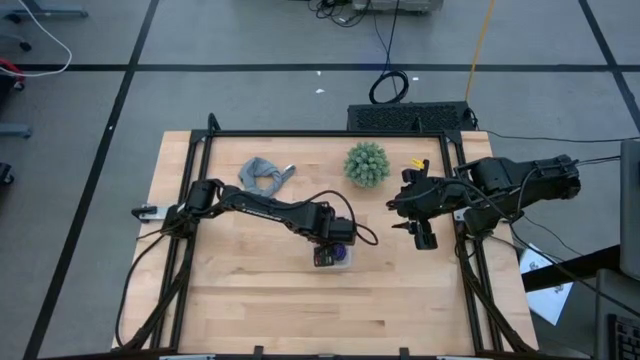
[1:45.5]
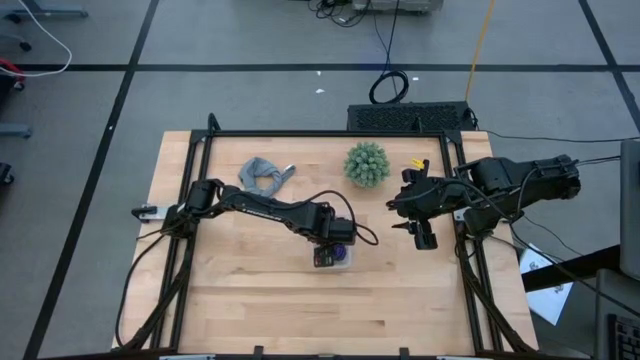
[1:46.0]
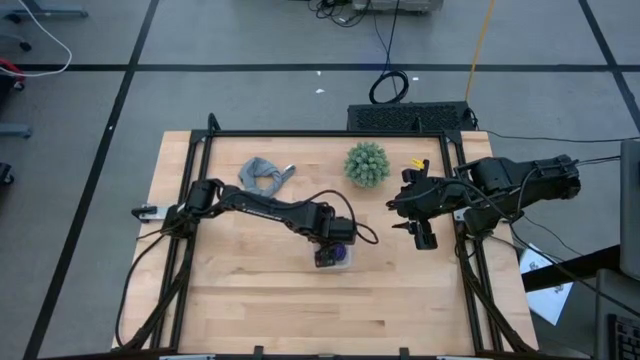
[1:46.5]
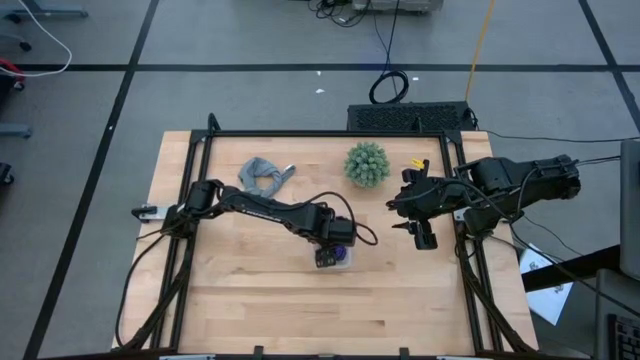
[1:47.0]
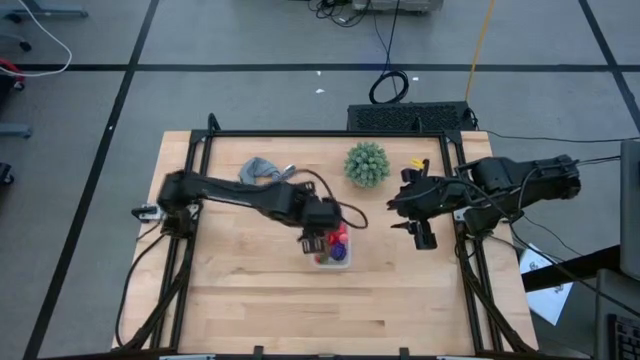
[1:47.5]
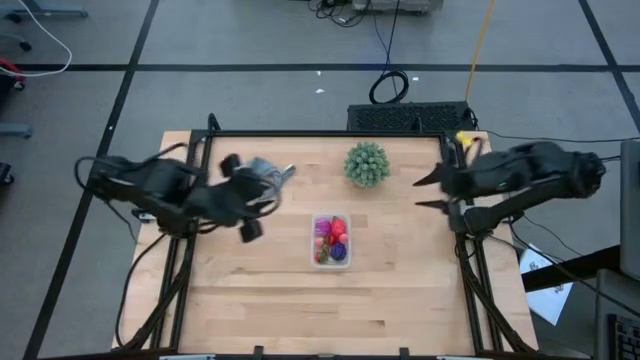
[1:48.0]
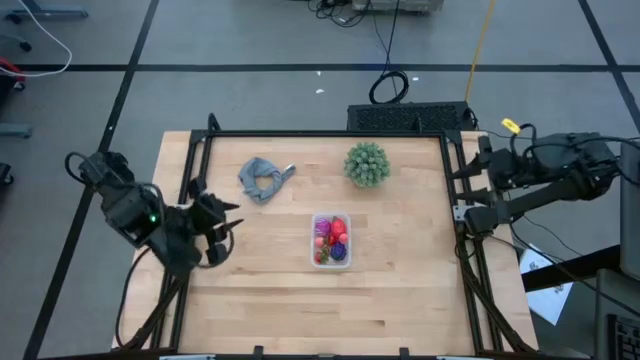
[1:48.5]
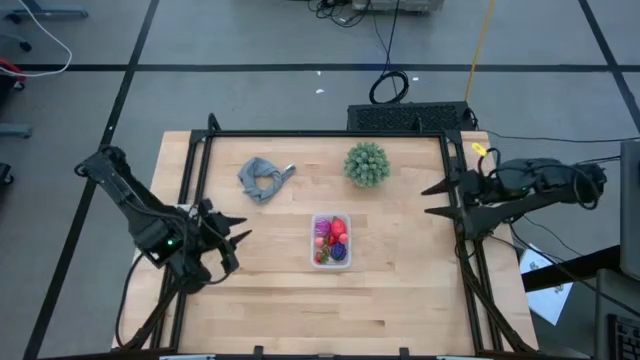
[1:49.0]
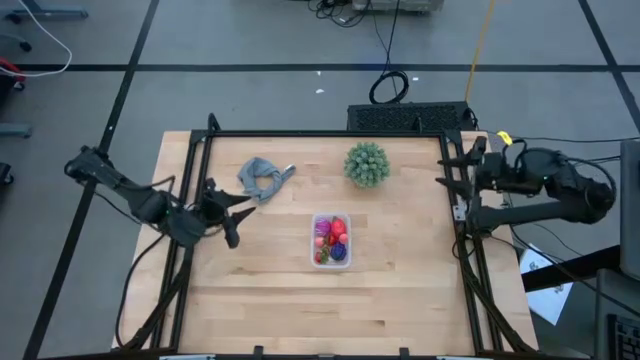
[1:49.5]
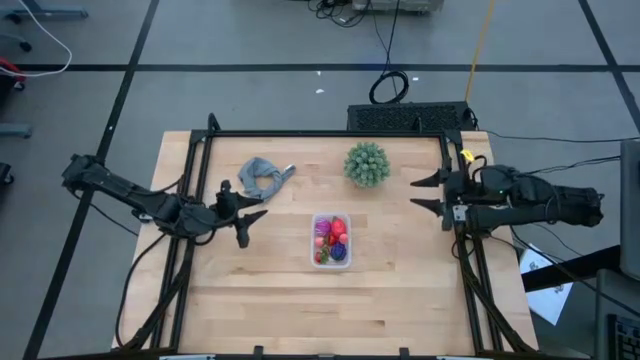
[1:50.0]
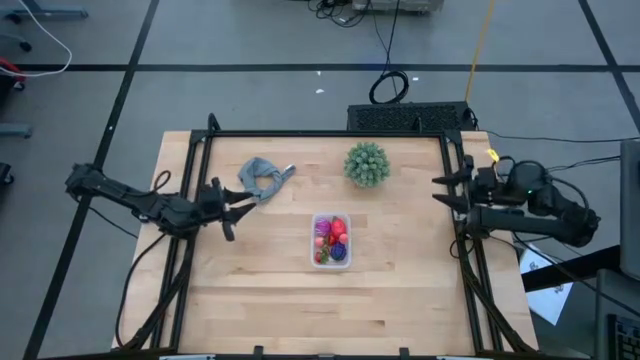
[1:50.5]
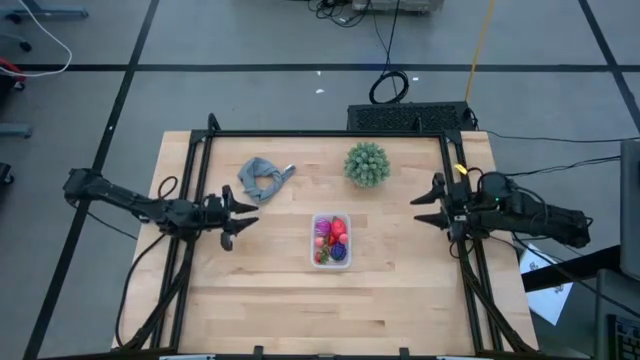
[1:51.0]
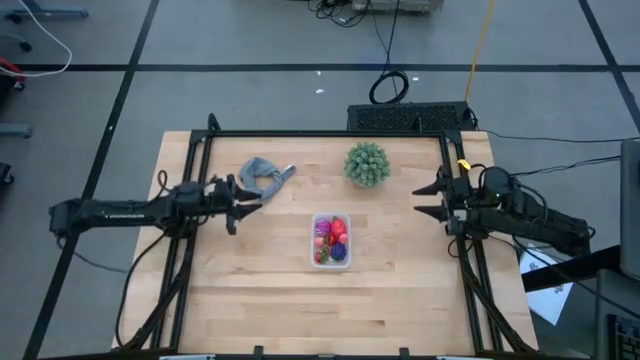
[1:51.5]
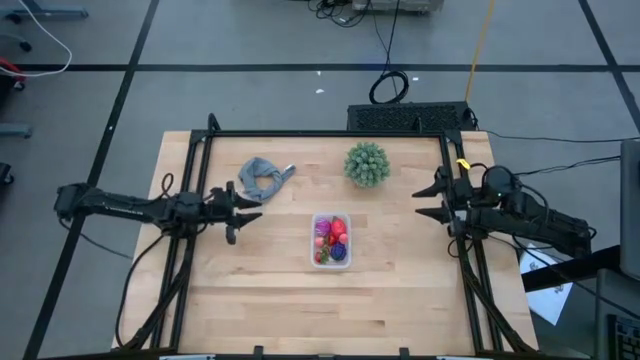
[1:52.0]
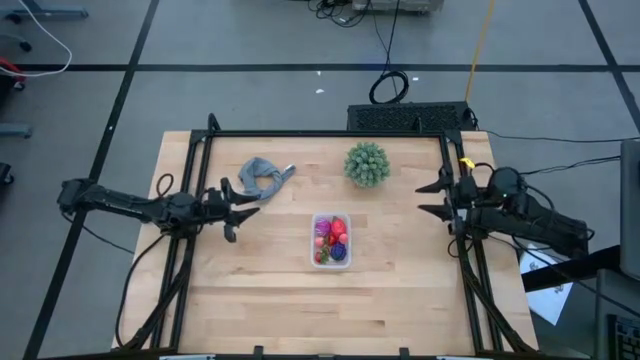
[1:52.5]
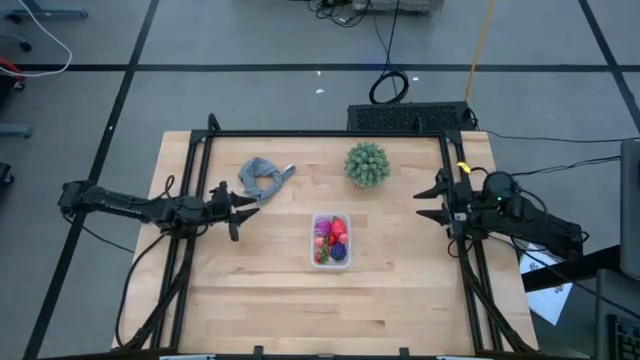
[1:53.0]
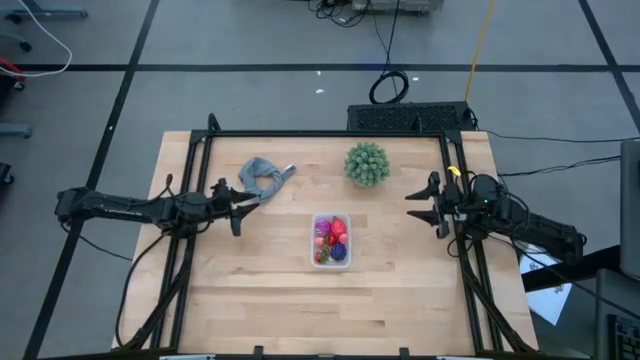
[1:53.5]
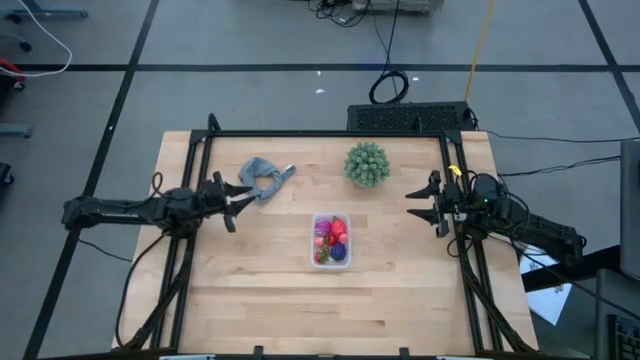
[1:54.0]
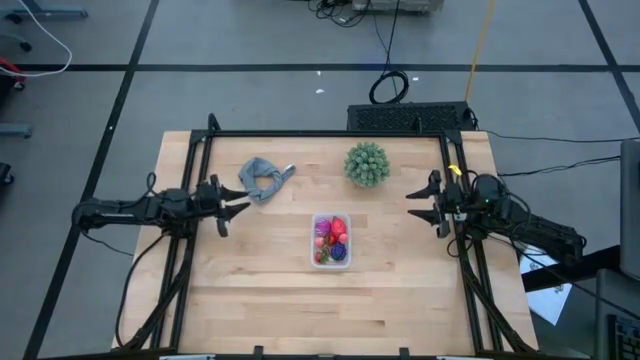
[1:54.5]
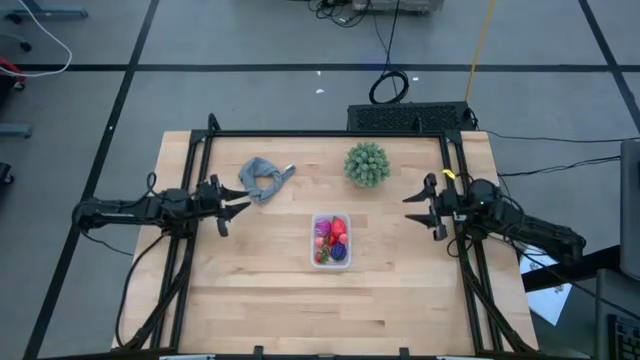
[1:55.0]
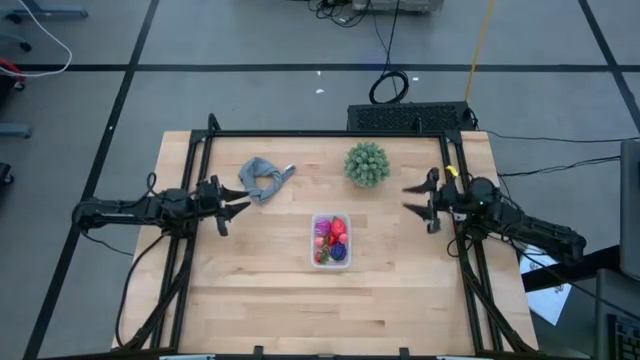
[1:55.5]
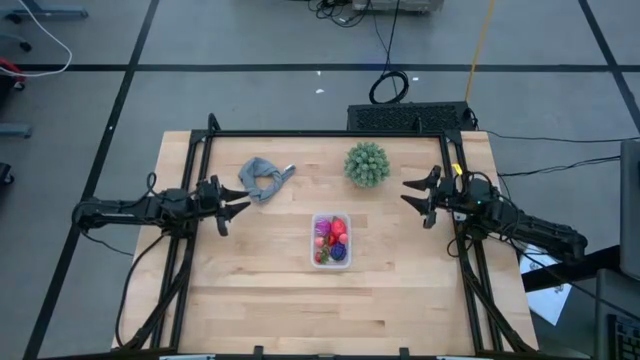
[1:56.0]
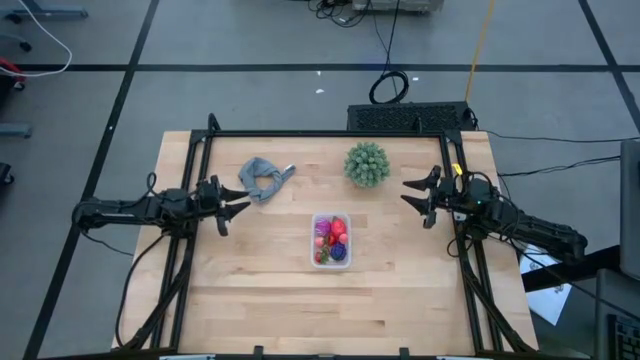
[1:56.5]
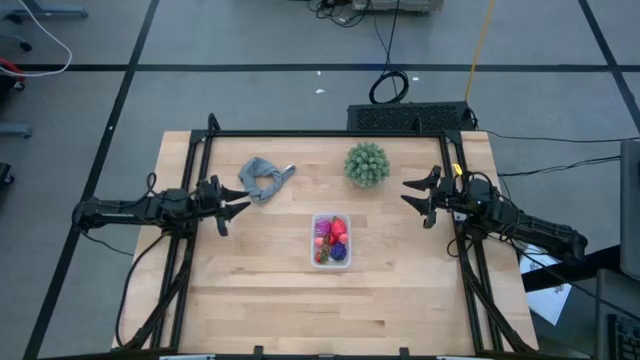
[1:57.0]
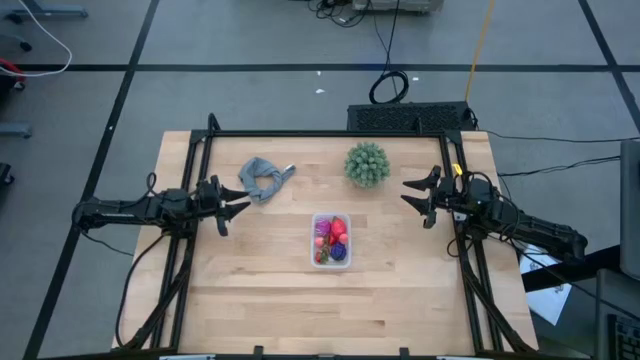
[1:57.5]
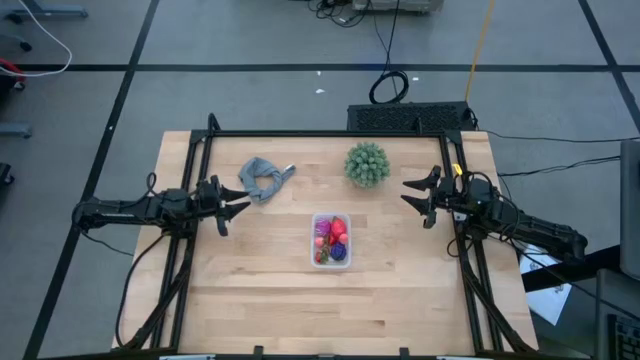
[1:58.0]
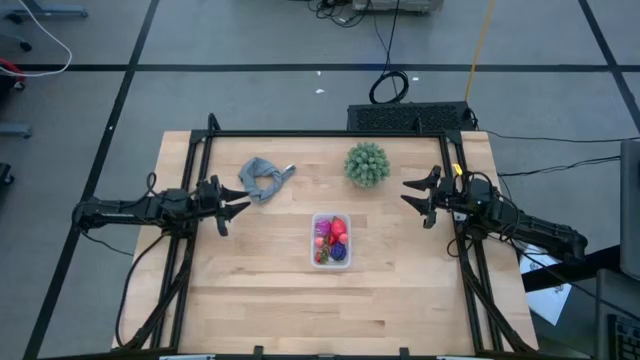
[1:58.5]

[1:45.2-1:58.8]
Task: Pick and placing Produce into tupperware
Return to Home Position
